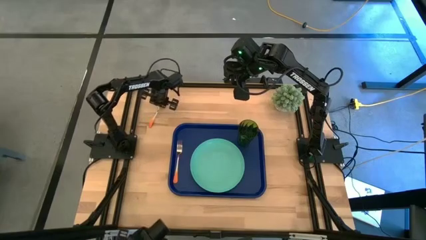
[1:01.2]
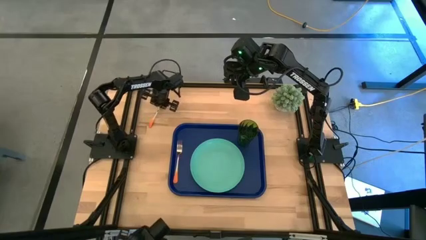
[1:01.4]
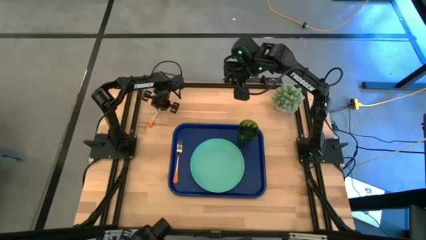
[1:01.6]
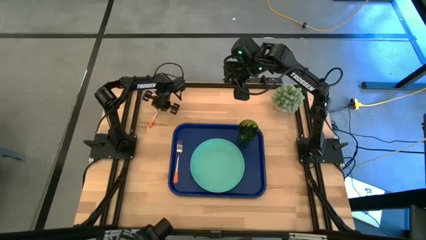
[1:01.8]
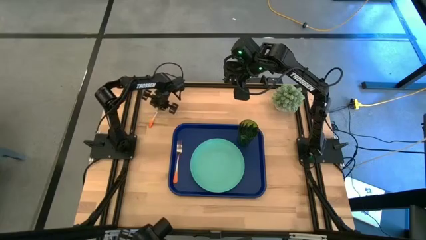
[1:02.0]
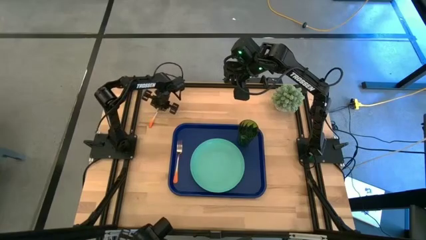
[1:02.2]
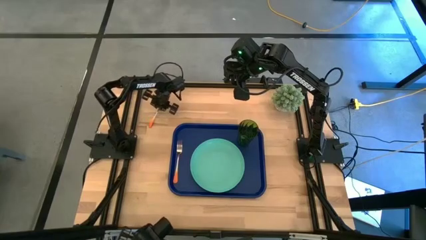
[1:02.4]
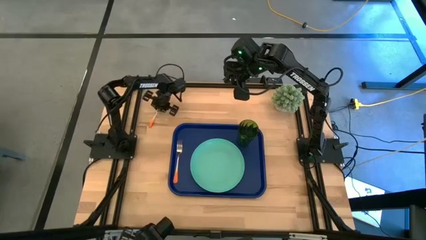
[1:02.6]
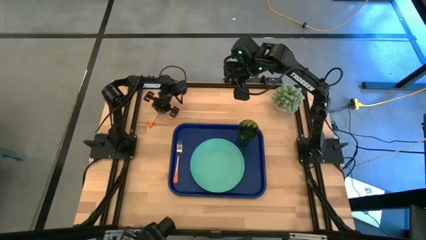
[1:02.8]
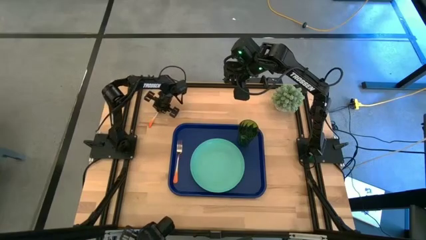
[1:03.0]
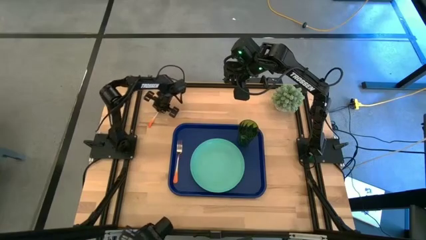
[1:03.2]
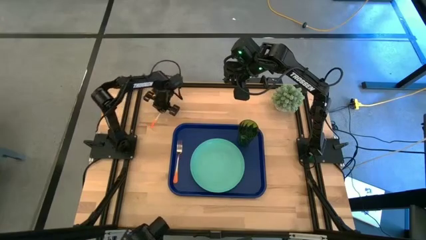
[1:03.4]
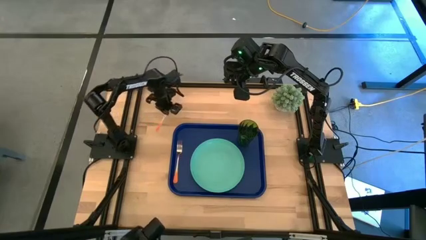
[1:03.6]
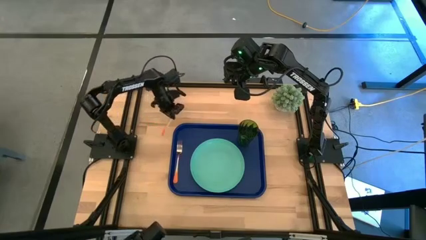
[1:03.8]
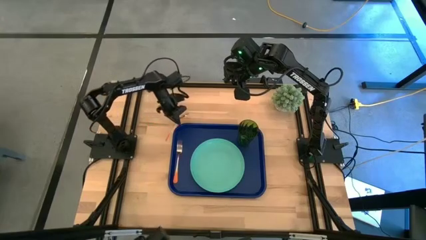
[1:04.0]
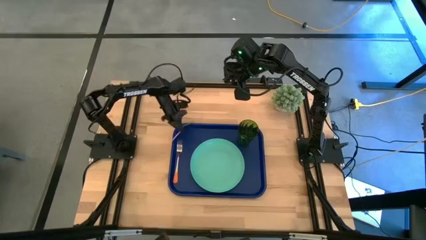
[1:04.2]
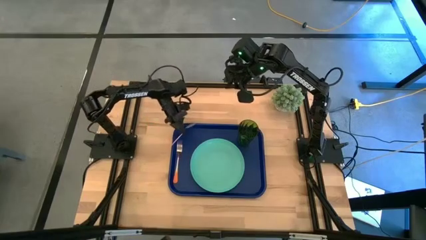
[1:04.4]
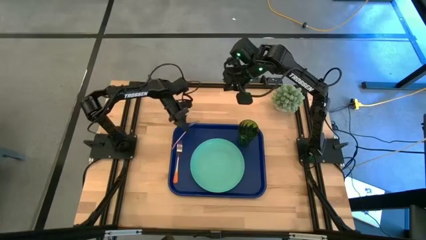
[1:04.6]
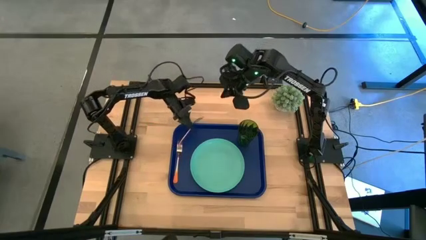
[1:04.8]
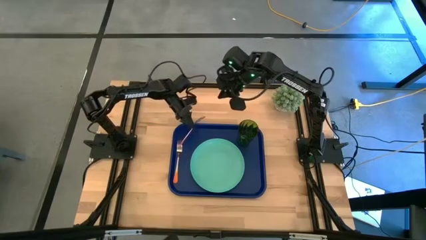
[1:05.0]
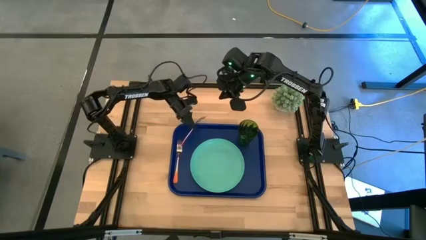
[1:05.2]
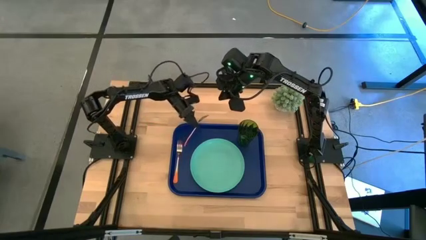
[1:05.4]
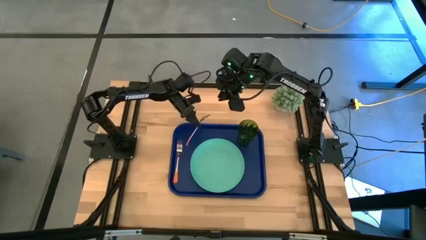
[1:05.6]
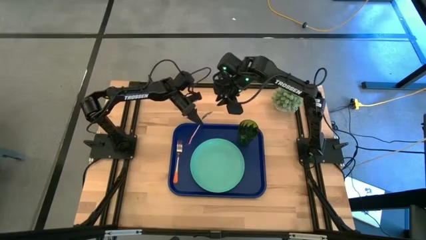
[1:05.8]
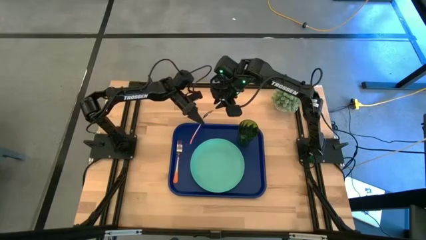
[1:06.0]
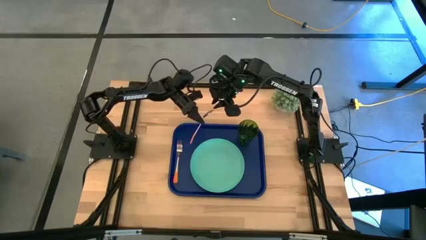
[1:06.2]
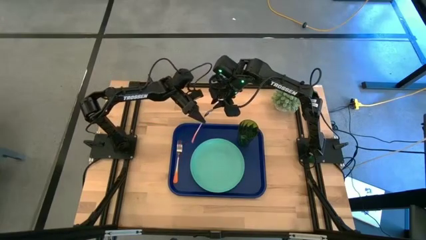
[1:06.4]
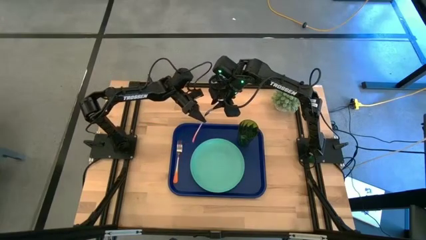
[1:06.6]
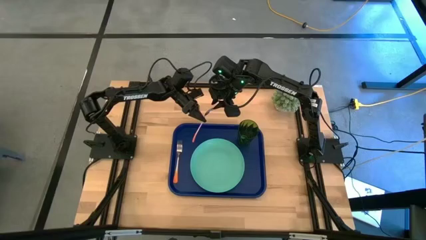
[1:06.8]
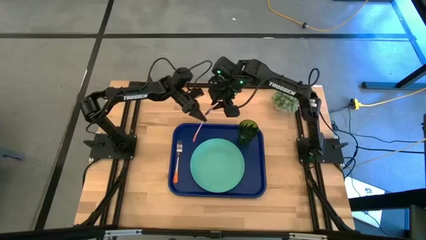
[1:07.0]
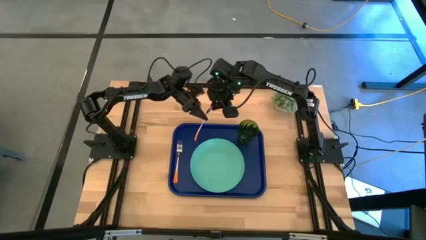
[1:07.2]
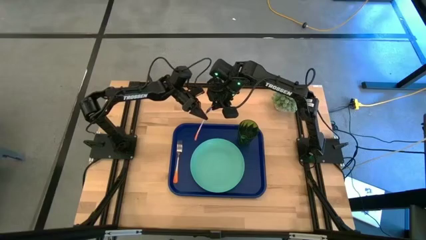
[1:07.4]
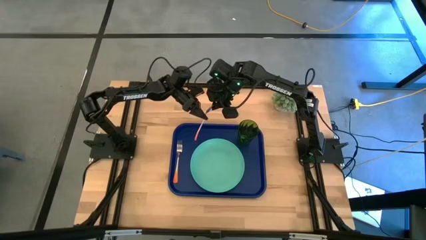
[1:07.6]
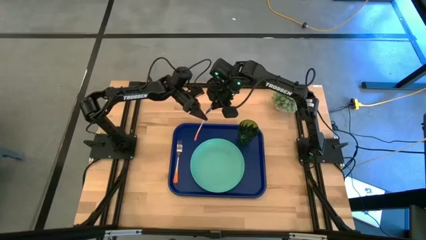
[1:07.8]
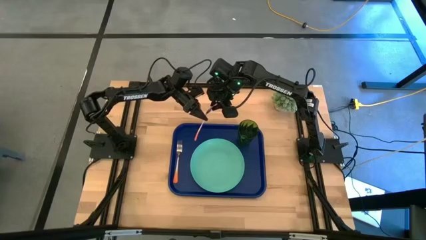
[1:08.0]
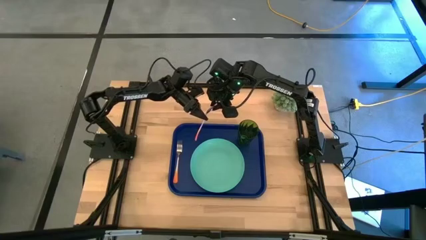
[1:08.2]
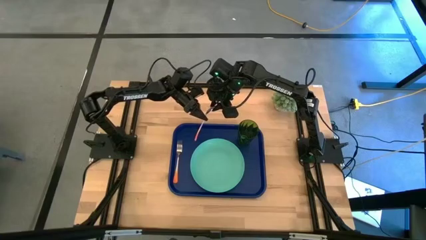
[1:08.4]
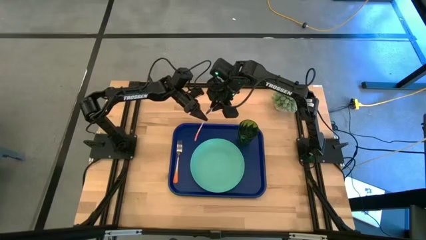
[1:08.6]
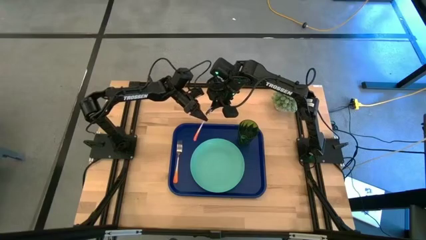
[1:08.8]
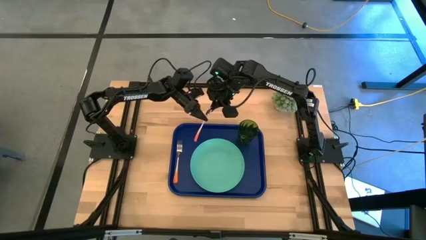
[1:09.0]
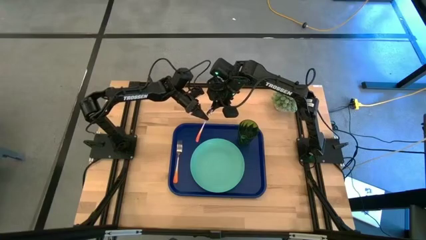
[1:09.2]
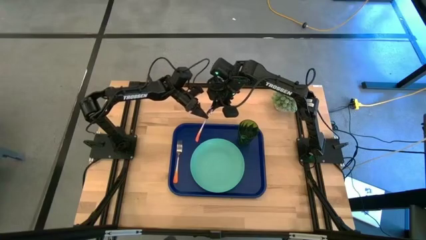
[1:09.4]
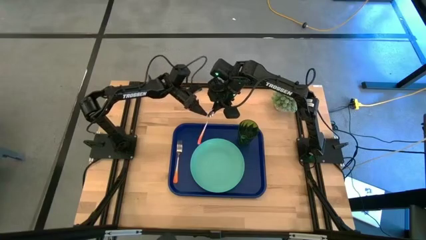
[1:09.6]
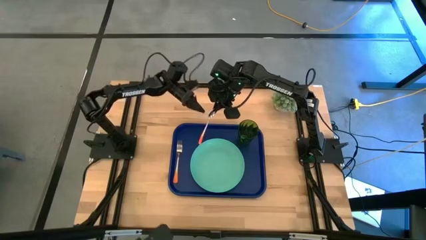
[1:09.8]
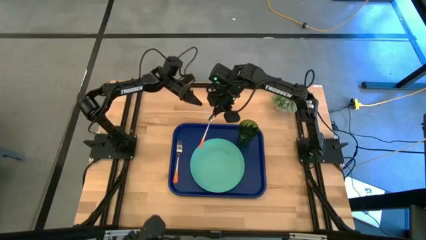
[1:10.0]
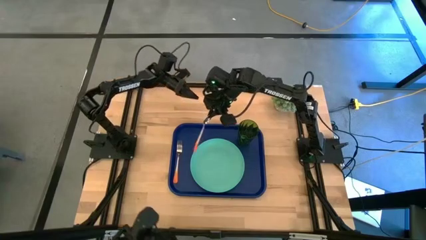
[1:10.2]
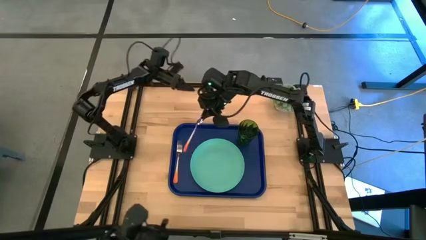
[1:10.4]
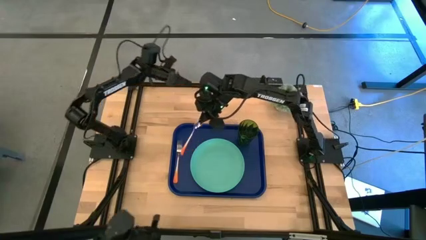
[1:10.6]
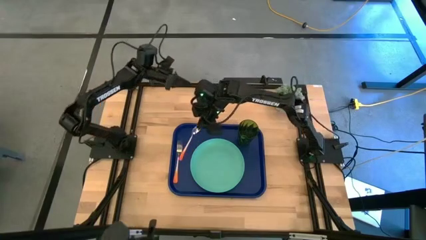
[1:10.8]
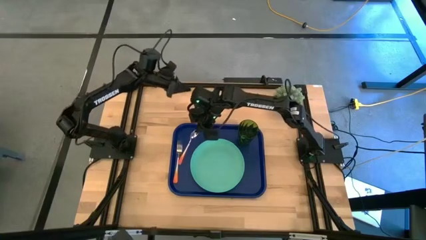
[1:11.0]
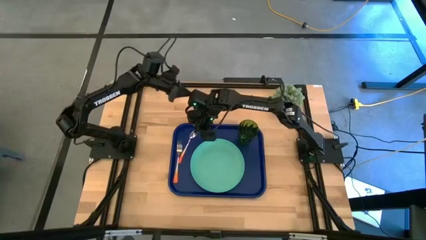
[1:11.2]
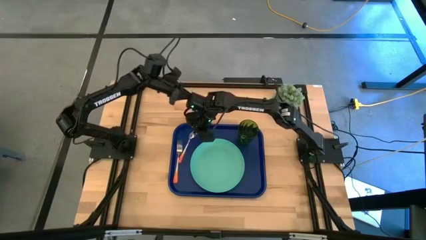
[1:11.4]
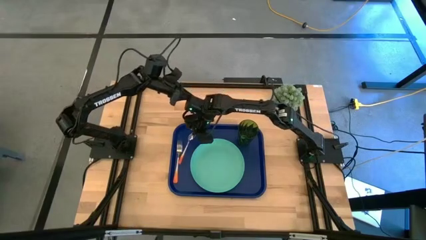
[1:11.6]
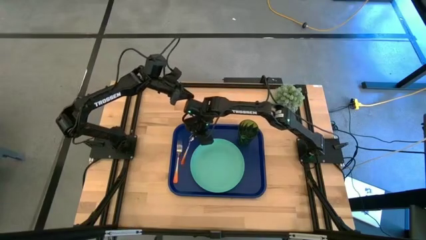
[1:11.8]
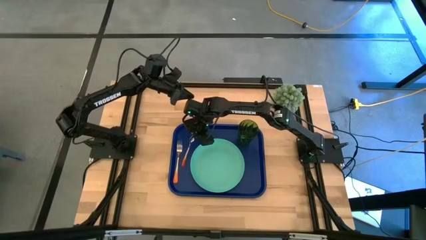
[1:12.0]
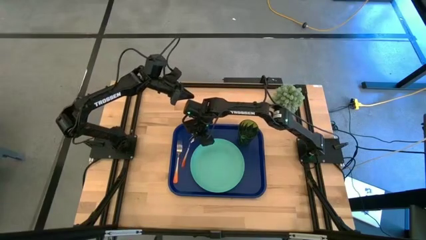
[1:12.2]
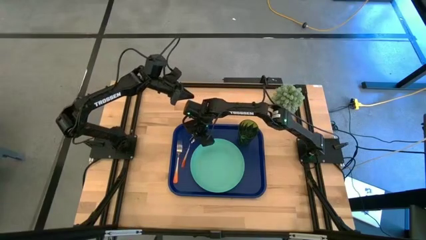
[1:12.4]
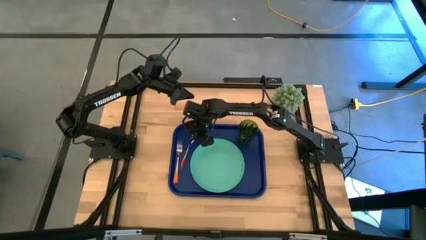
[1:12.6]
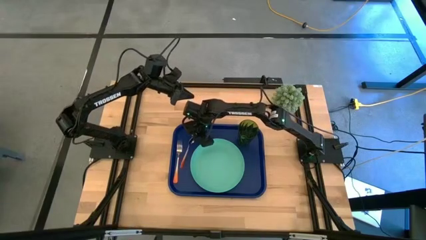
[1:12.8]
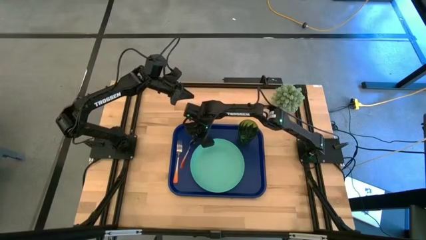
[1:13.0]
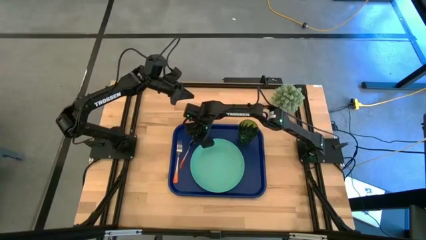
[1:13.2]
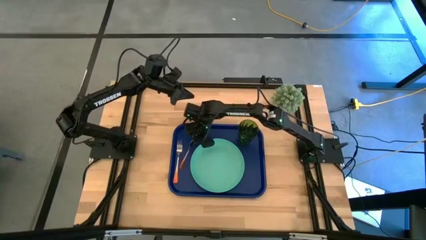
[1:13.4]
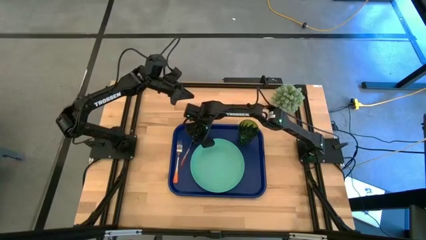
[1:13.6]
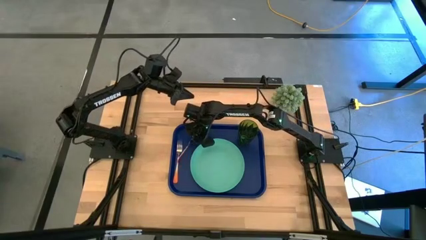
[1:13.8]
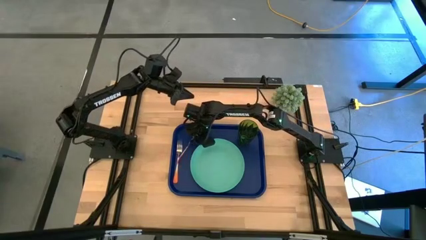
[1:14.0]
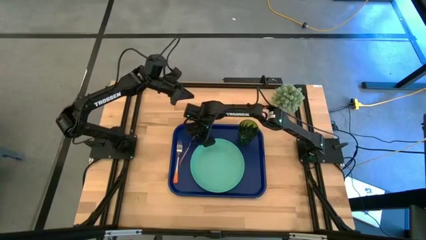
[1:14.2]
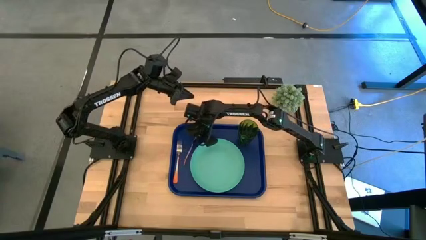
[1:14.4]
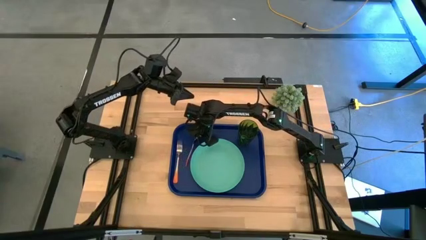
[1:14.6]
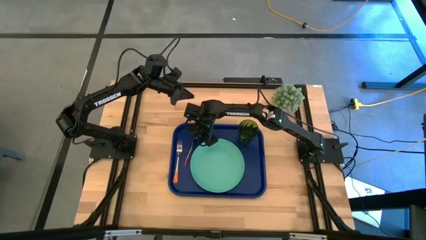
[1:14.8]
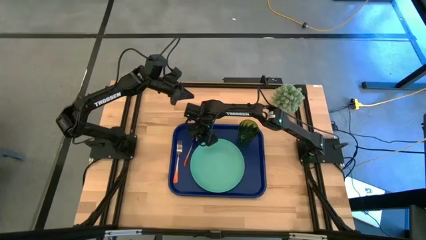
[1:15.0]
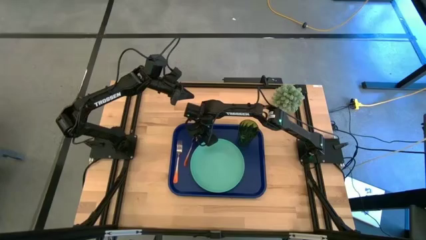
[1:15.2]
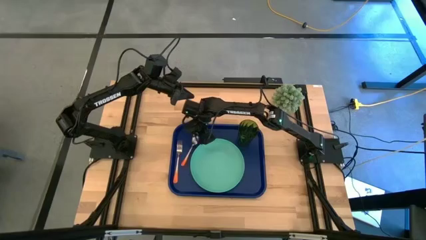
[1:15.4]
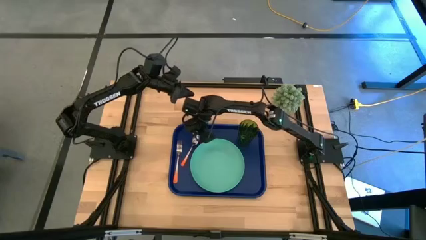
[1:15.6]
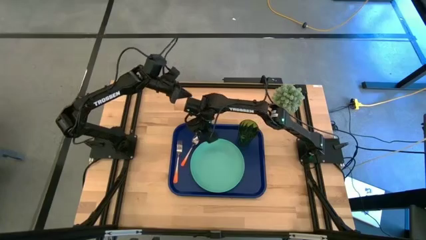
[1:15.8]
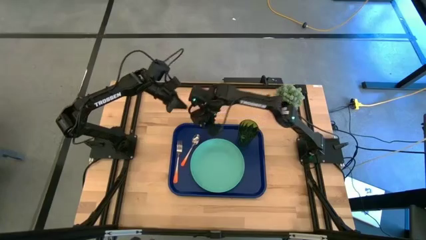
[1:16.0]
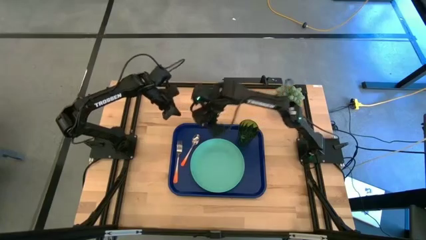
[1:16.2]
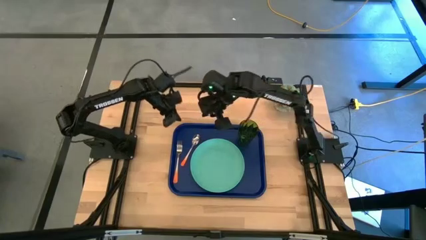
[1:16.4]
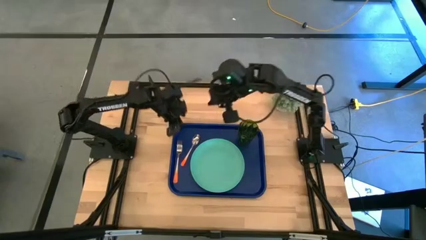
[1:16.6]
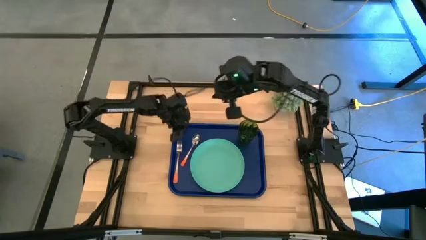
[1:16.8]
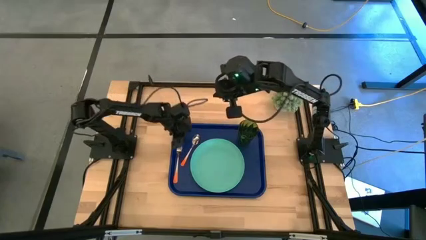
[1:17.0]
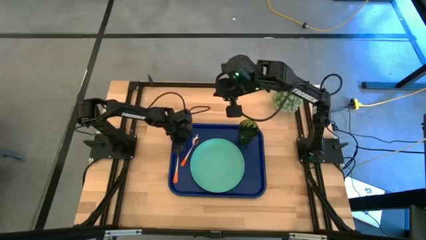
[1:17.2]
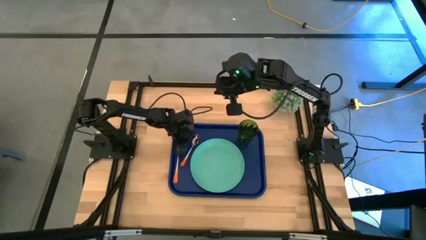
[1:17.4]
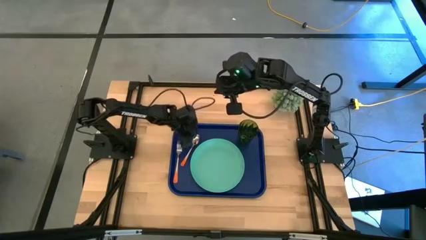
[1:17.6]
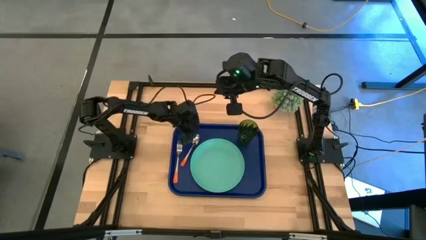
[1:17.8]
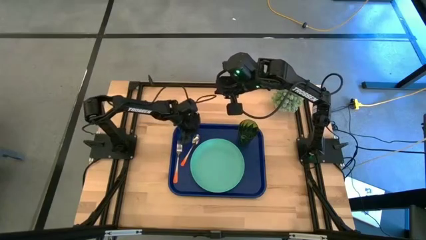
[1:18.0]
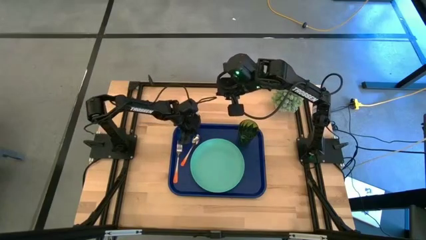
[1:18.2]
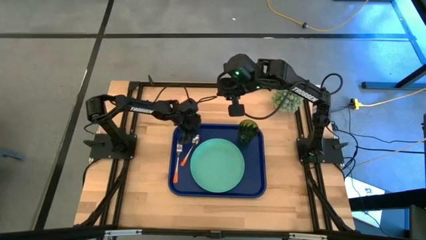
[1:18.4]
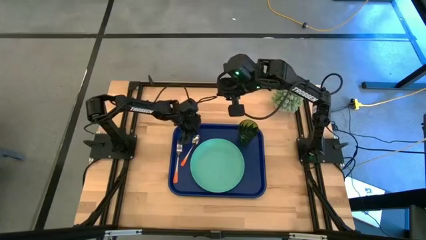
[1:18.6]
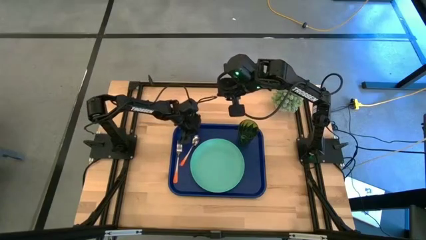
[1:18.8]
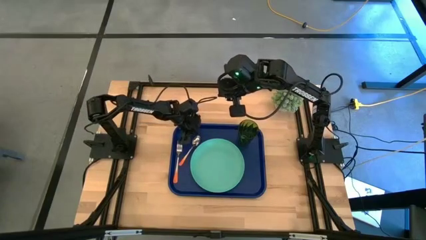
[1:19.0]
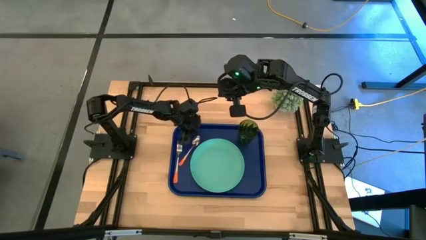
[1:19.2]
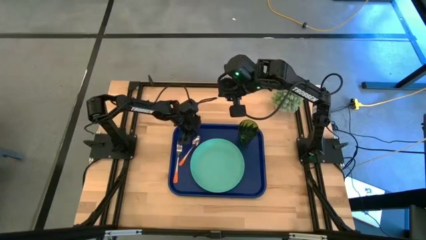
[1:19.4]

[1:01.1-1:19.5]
Task: Pick and place plate/cup/fork/spoon on tray
Put the orange spoon on the left of the green plate on the blue tray
